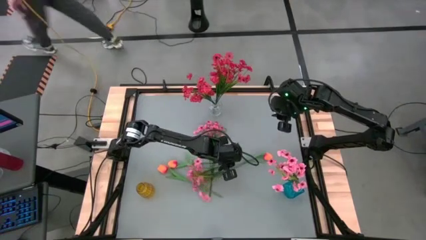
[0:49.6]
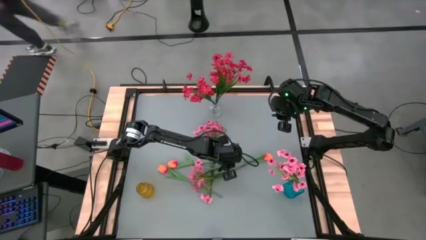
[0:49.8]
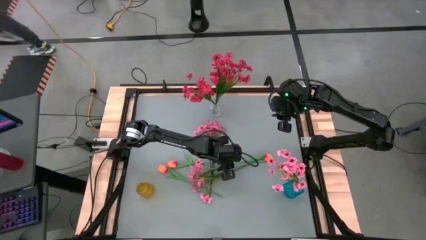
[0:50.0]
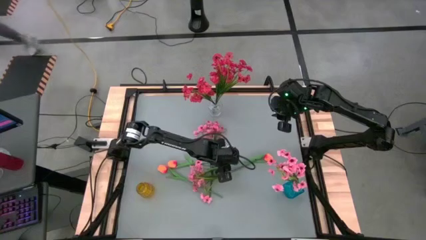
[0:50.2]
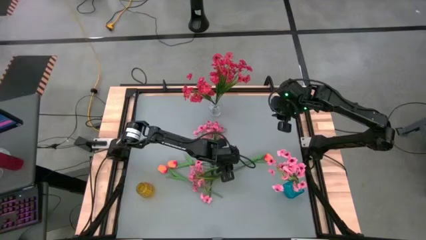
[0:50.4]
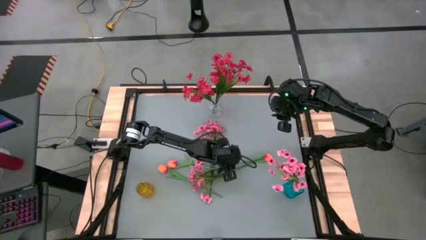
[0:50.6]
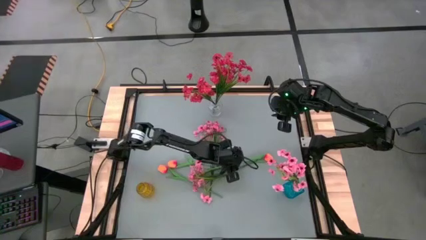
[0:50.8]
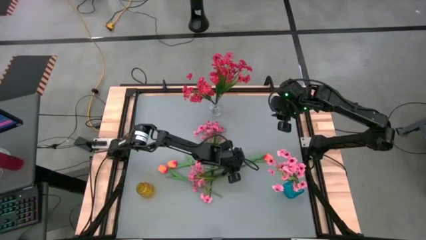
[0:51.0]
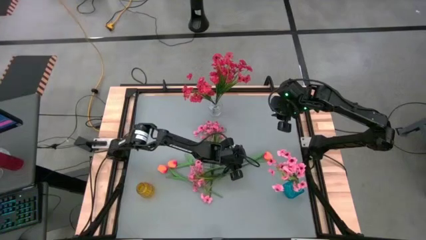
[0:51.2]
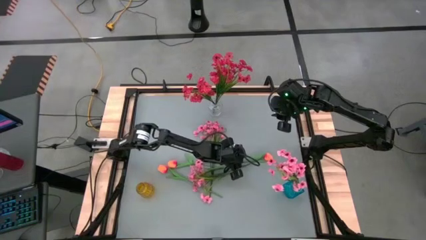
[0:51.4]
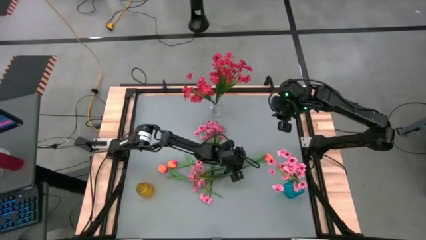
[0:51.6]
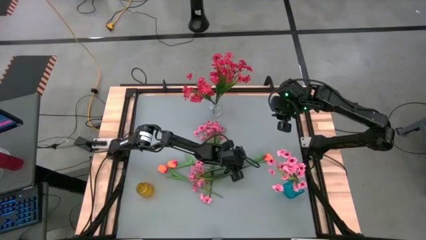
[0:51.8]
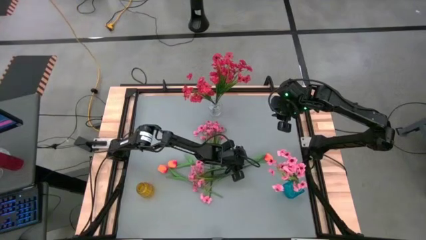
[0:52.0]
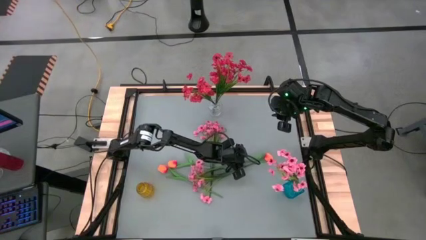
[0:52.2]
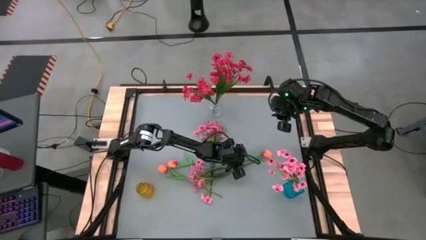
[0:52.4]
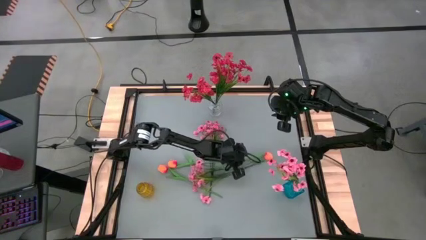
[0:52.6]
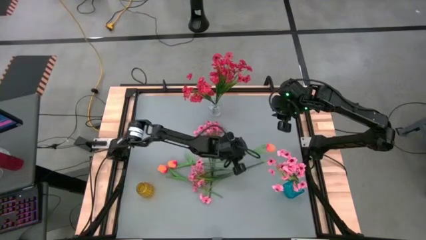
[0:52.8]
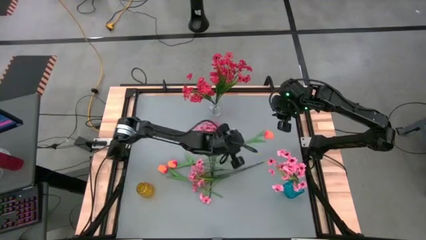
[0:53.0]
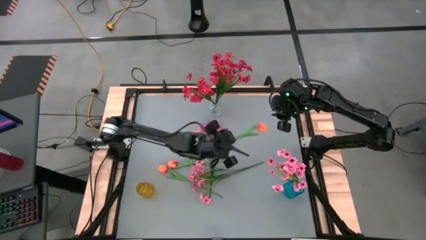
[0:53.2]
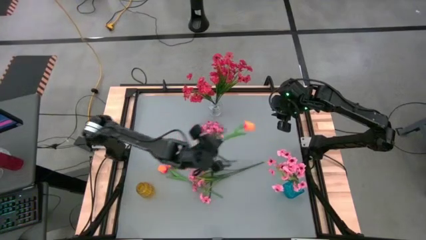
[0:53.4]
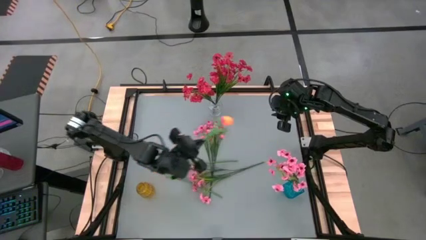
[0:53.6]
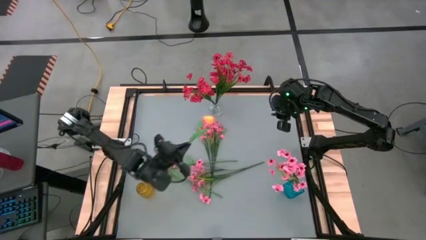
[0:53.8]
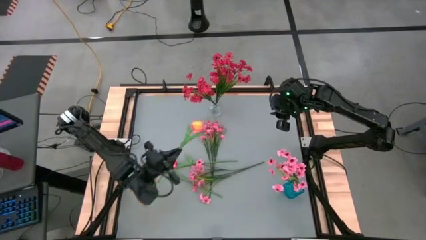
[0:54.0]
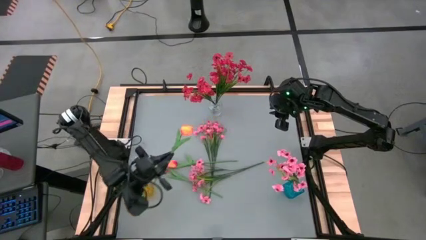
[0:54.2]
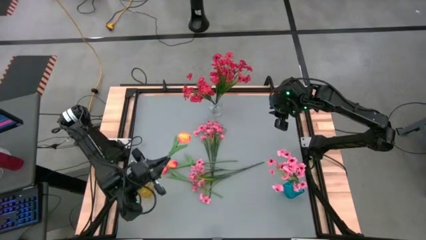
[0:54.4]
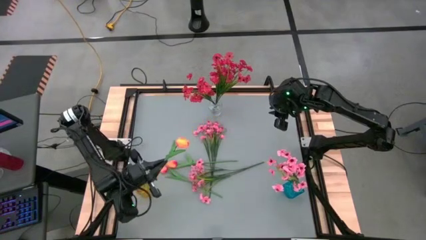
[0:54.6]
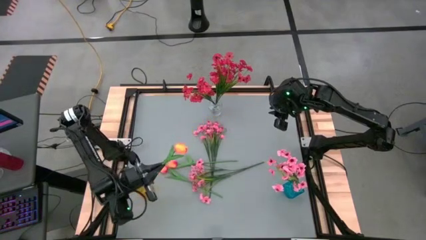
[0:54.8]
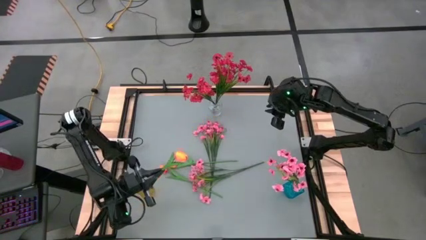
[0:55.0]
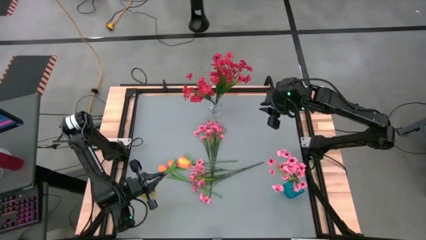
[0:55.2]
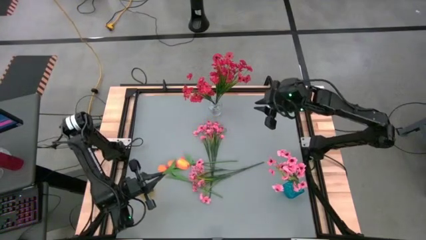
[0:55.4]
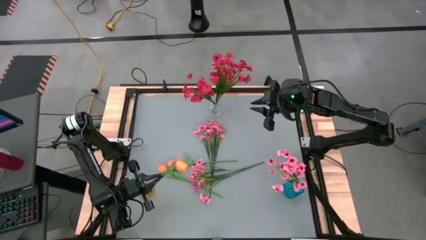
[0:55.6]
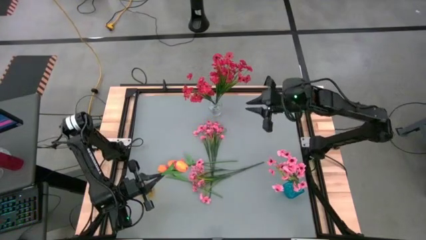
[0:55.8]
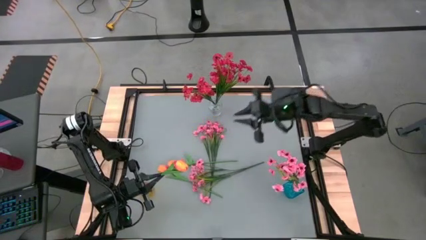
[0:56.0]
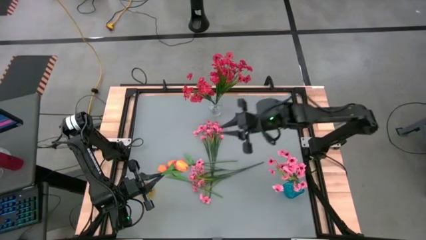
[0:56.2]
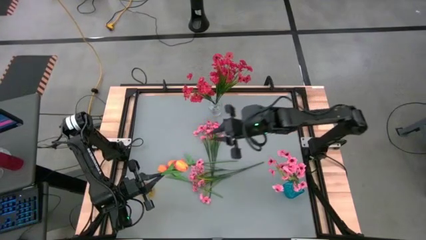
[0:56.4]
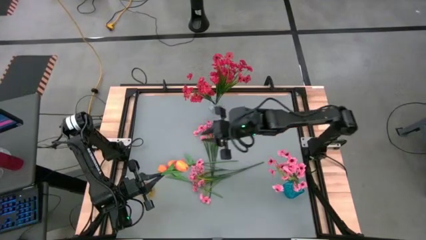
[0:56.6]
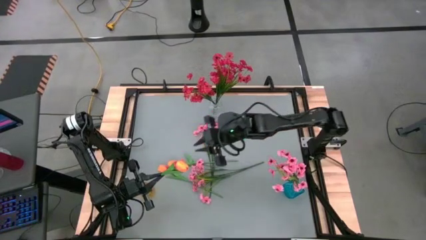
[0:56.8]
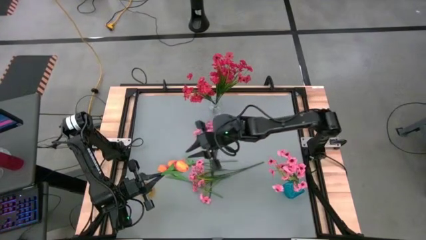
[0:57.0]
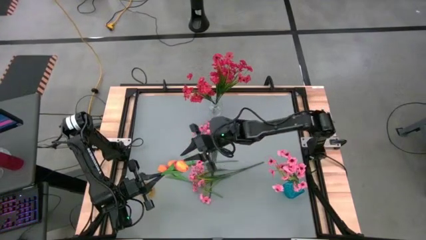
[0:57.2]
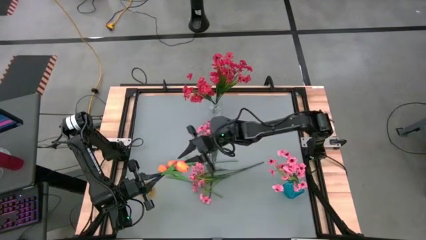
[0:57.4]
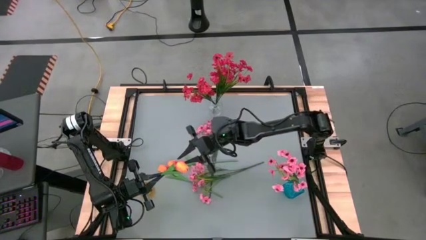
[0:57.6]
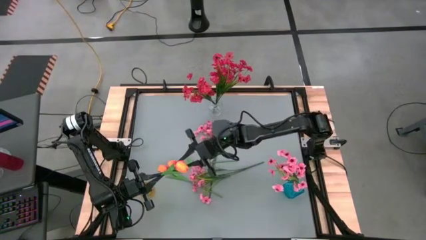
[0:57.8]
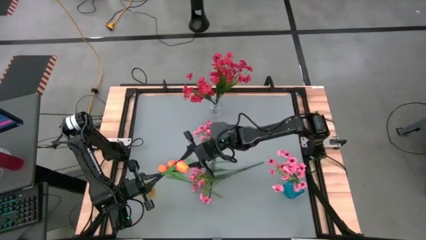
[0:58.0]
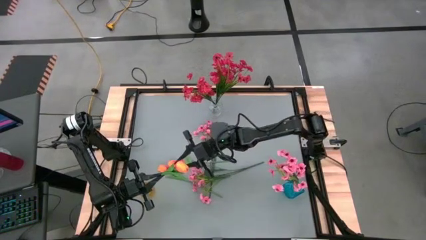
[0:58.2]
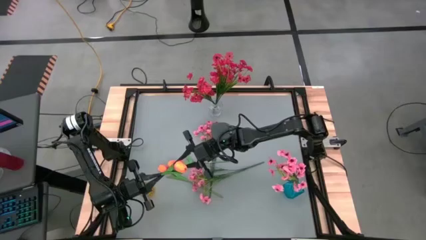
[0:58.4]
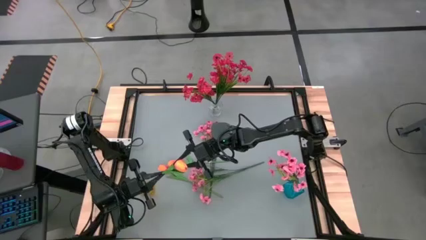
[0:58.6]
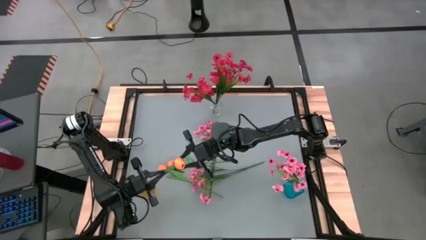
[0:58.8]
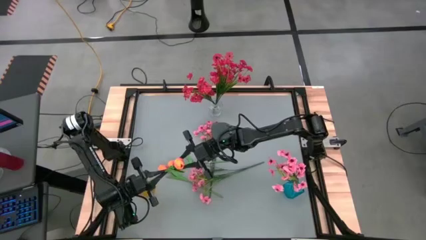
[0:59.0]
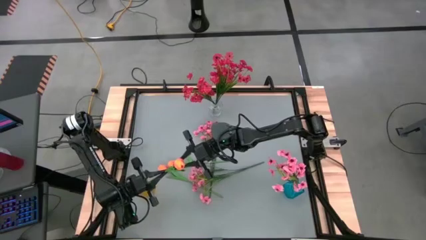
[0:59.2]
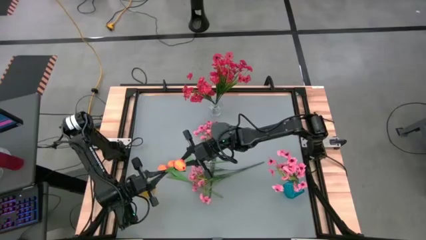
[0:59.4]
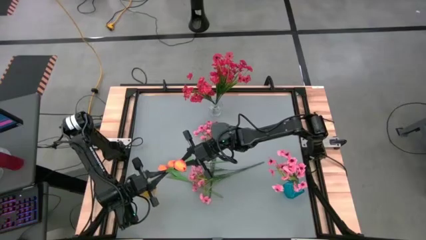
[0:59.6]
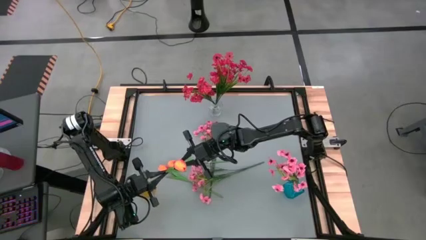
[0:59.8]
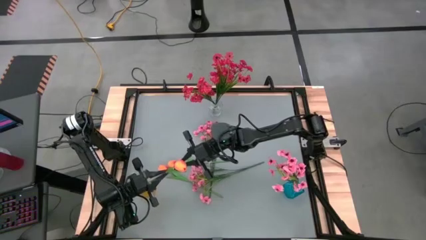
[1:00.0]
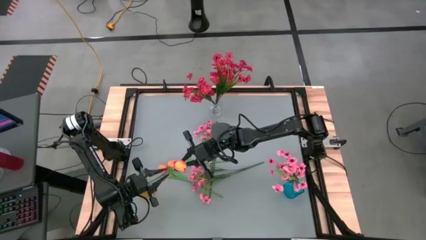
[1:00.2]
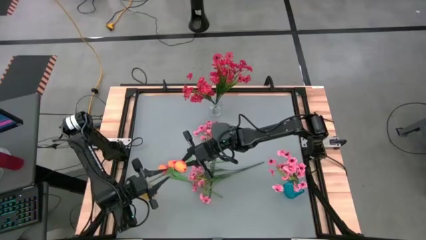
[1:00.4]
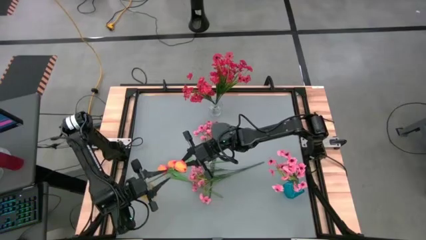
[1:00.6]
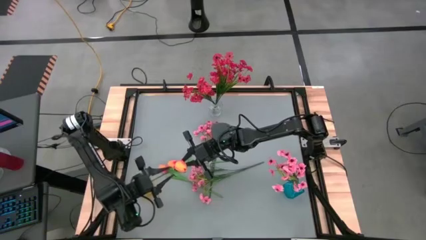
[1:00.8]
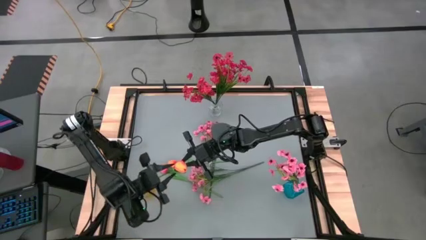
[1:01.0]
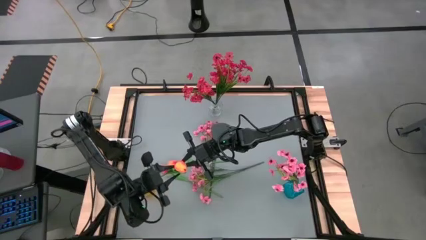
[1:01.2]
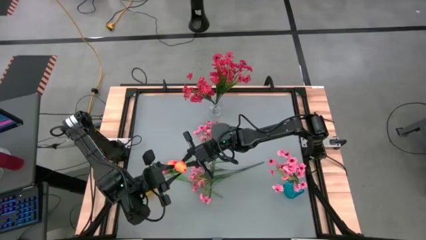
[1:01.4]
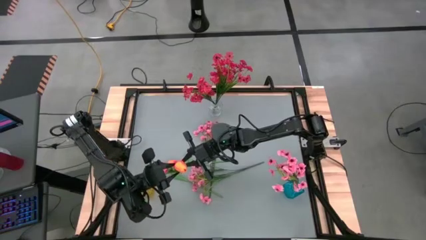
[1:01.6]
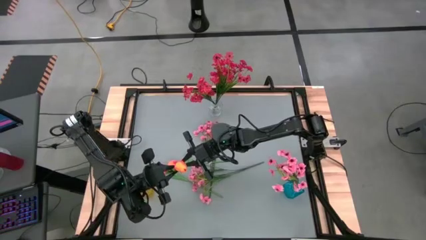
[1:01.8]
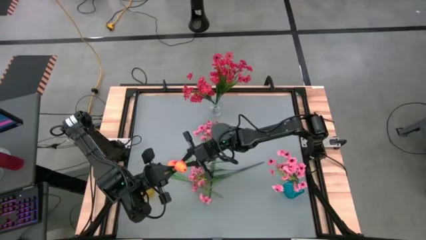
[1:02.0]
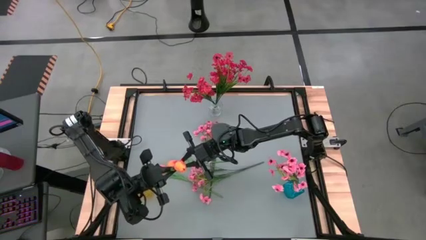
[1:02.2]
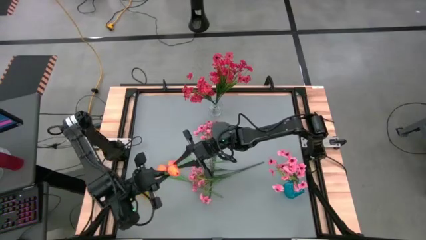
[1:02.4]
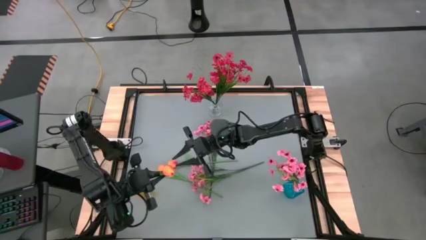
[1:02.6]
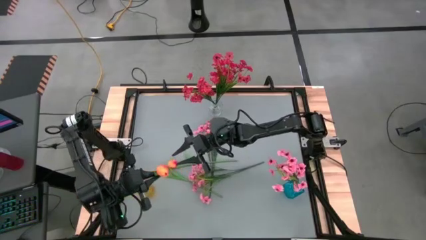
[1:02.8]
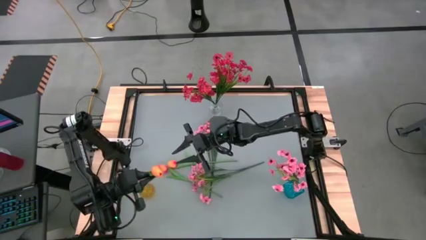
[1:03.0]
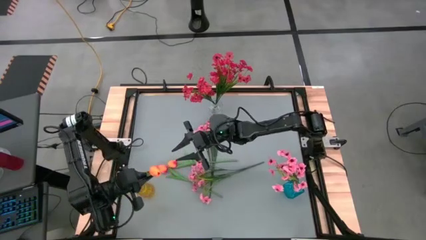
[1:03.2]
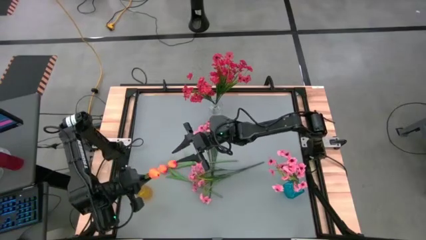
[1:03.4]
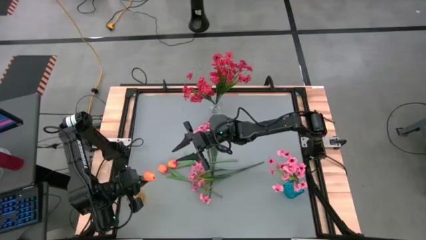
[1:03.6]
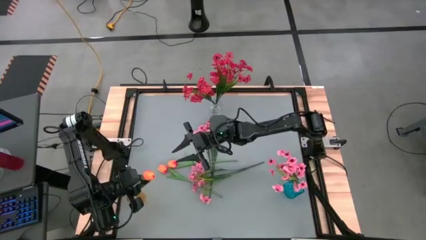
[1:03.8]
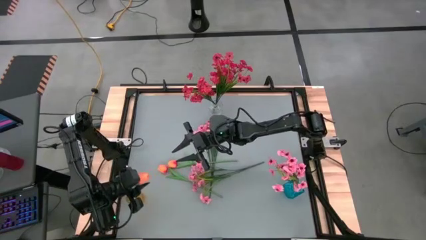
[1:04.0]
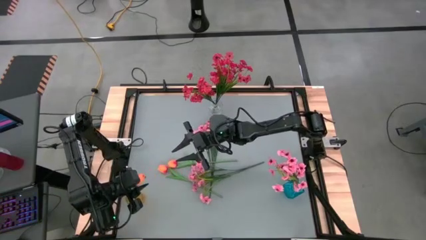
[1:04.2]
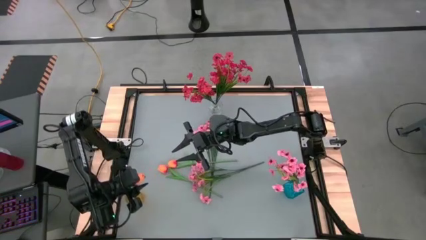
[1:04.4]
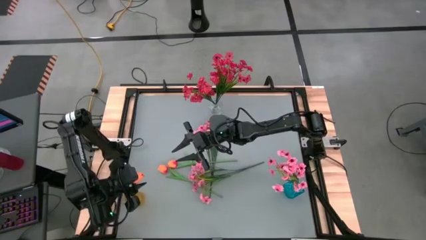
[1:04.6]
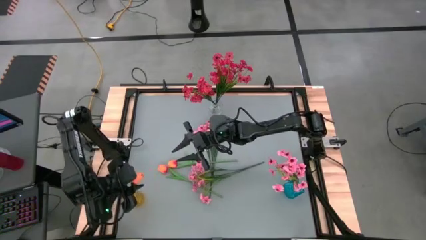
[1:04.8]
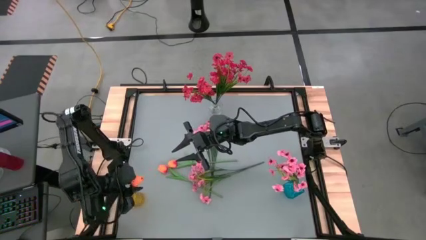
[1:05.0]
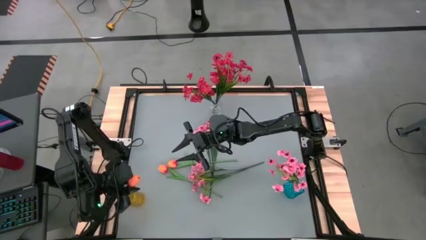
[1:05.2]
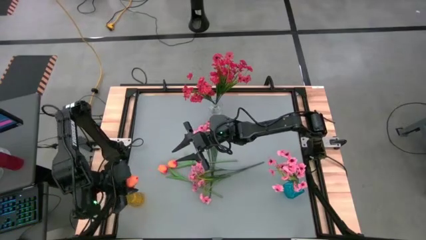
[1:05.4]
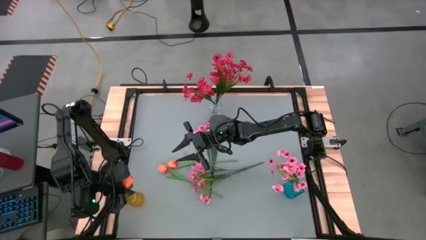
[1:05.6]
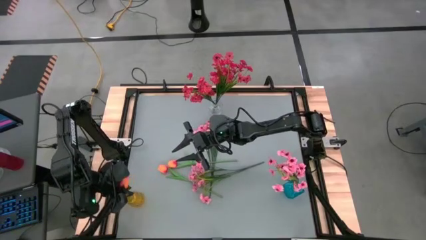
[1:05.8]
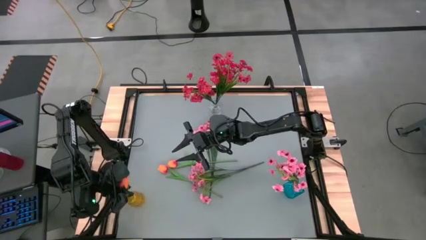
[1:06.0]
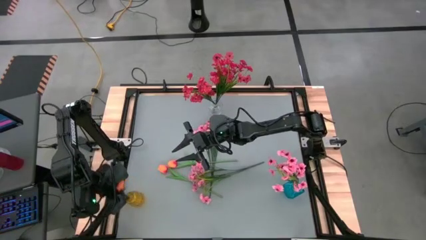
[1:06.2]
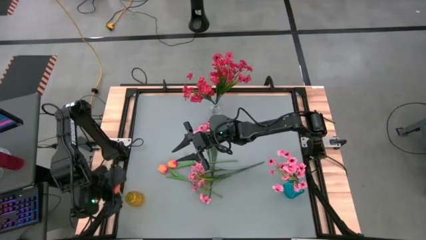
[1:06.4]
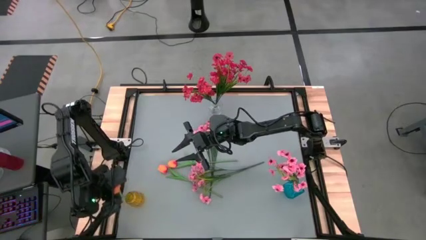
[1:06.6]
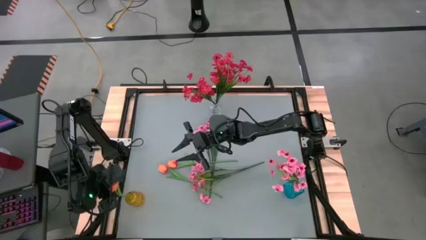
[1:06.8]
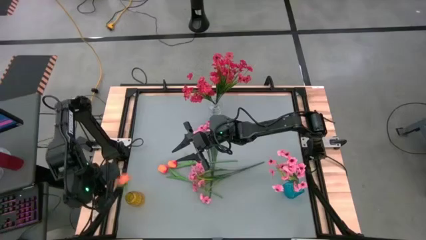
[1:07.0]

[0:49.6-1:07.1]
Task: Sort flowers into vase by color
Put the right orange tulip flower into the yellow vase
